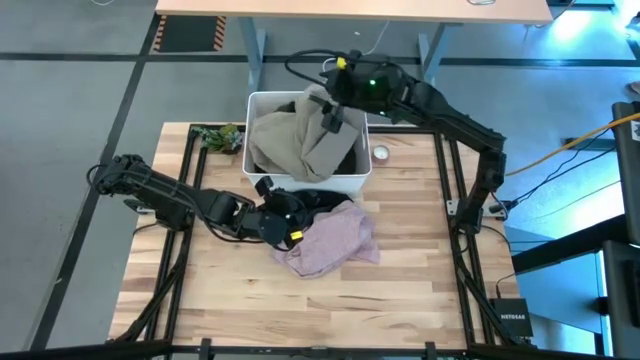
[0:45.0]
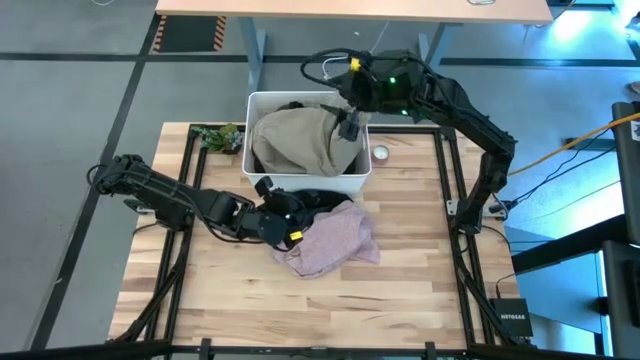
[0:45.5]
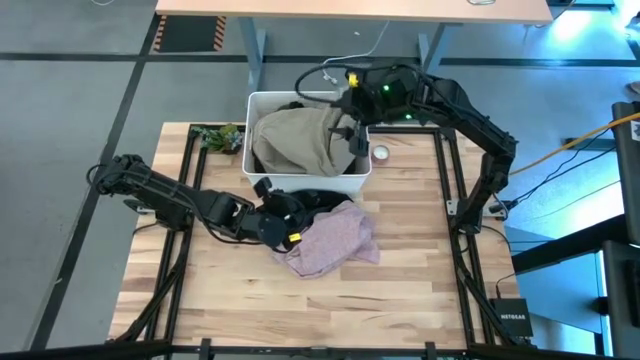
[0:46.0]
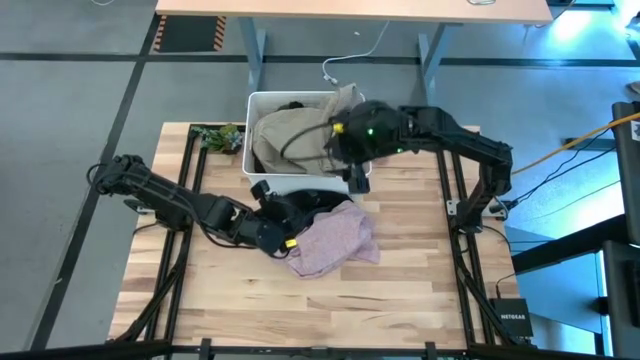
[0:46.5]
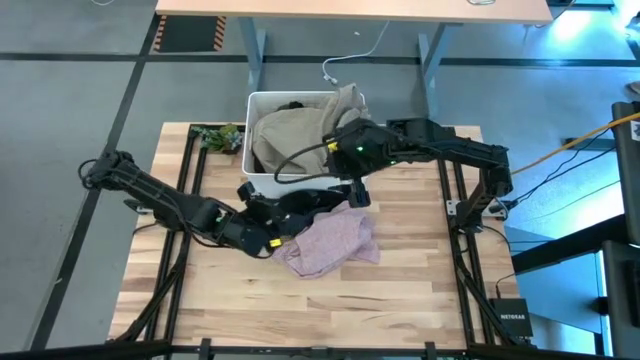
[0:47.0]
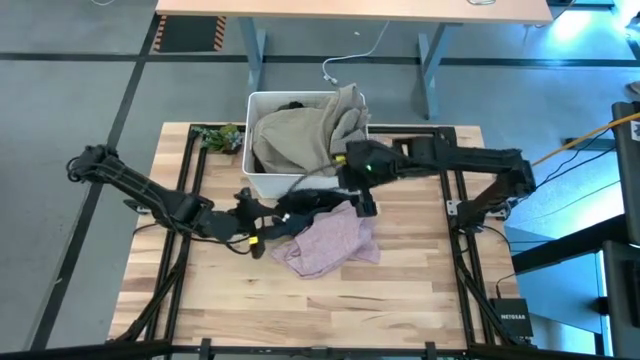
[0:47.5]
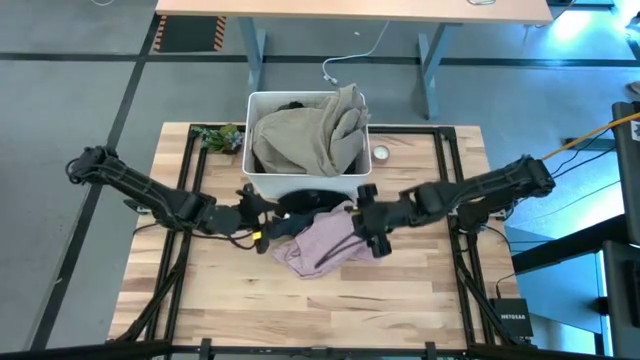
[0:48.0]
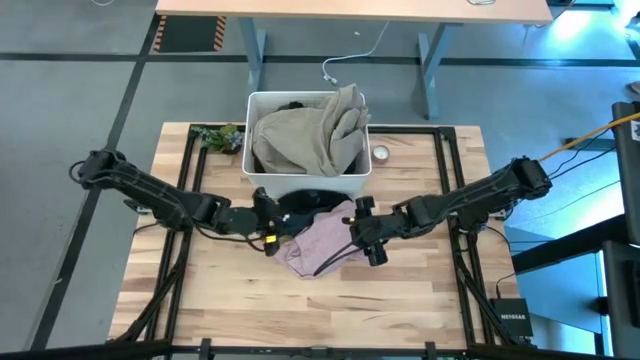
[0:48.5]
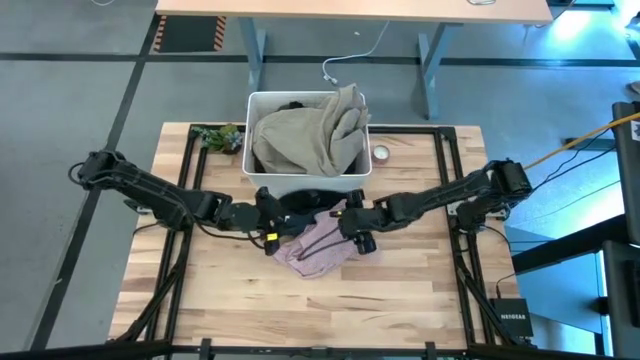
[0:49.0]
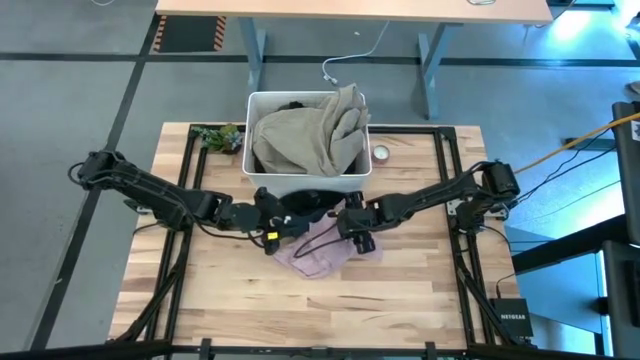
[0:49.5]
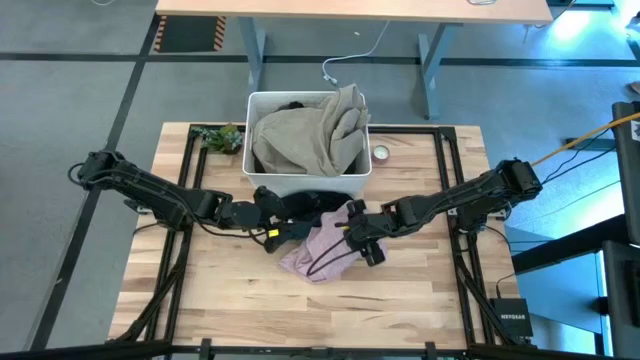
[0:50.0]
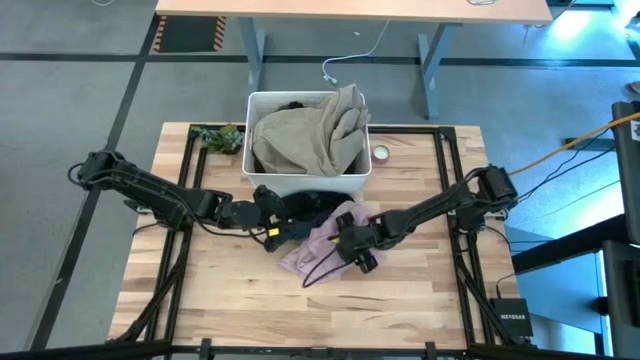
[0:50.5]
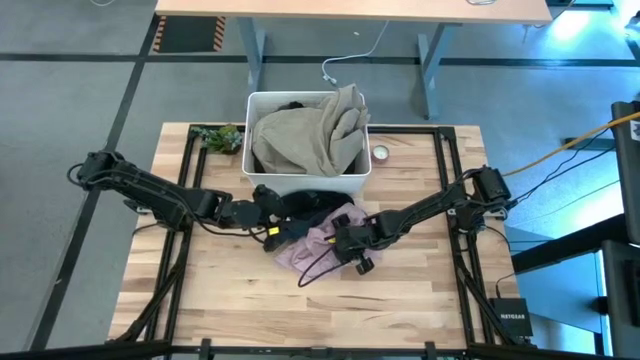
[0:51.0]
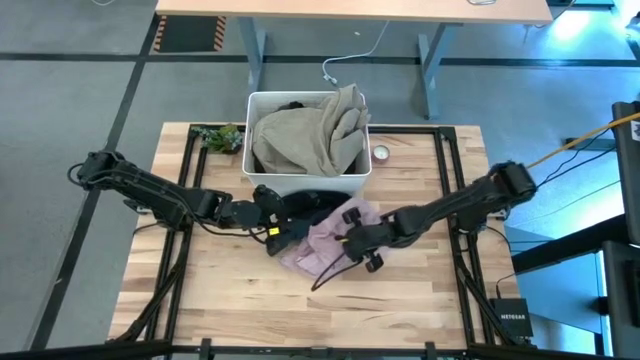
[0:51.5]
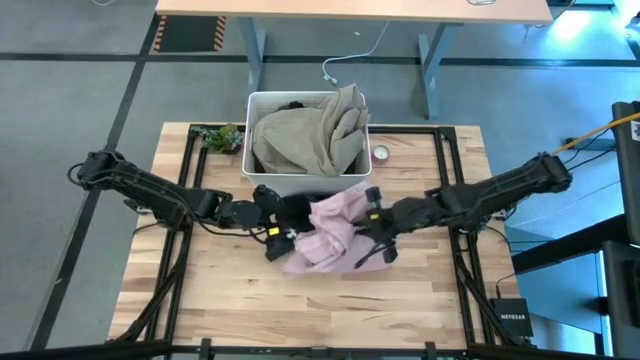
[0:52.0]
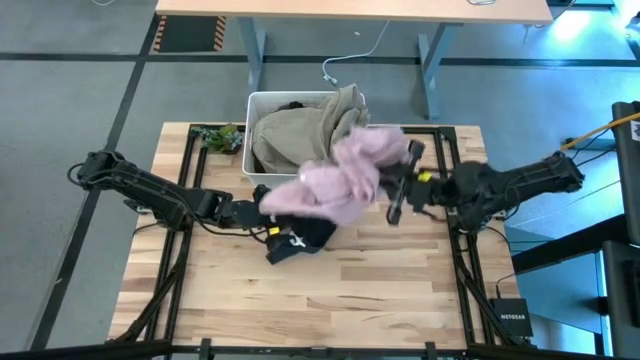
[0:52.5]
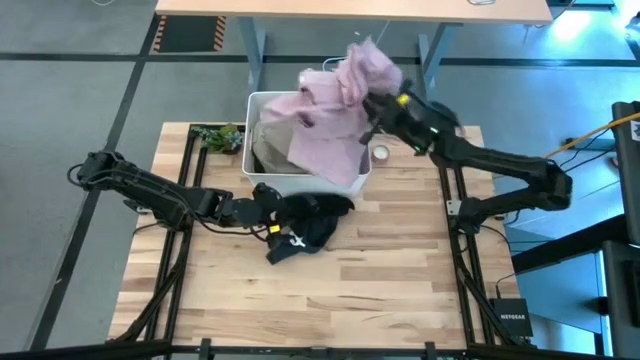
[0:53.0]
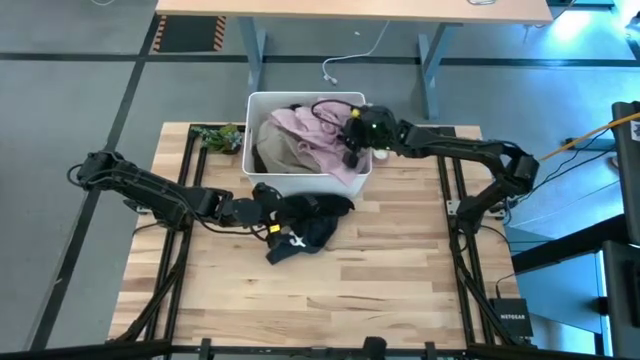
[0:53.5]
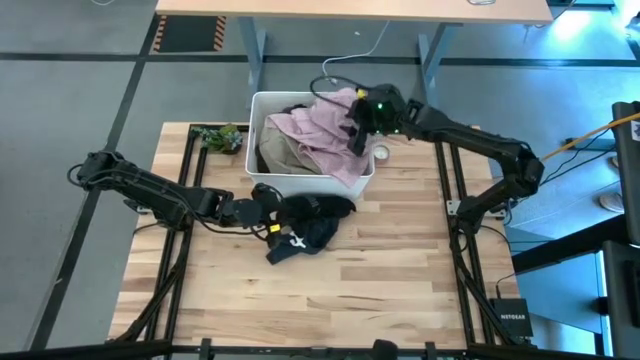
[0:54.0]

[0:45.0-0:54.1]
Task: Sort clothes
Put the pink shirt into the white laundry bin

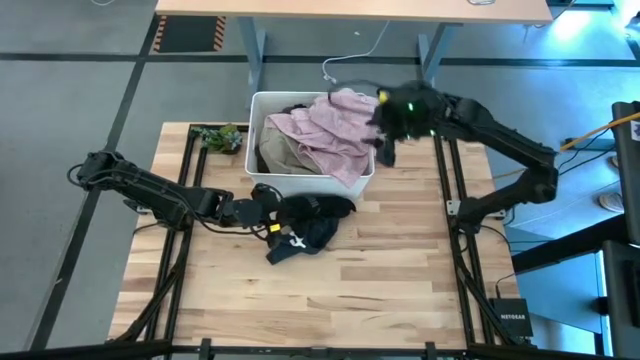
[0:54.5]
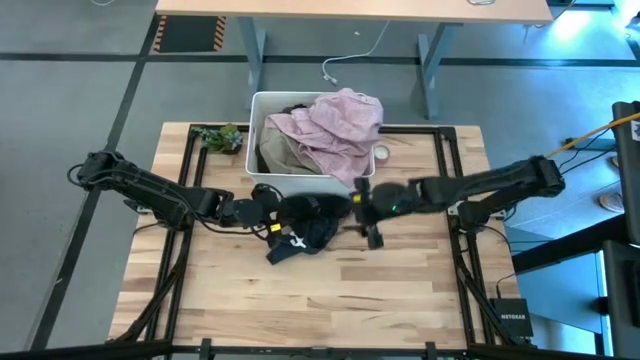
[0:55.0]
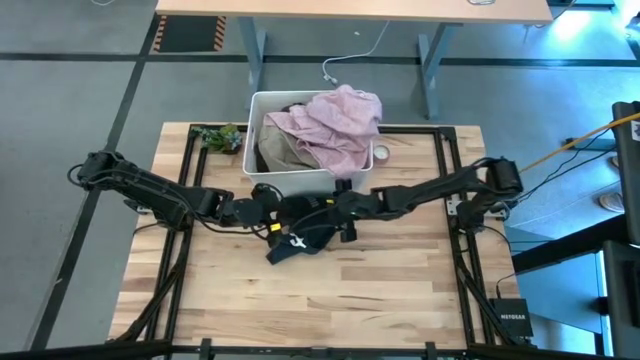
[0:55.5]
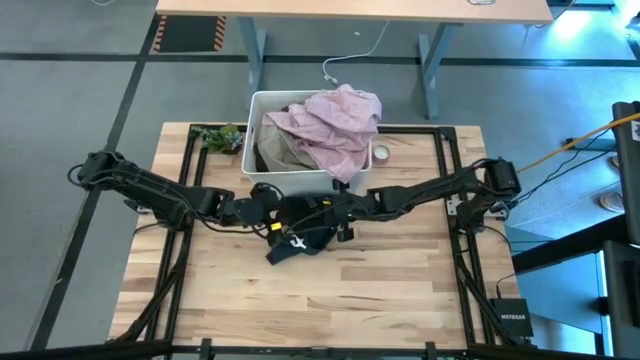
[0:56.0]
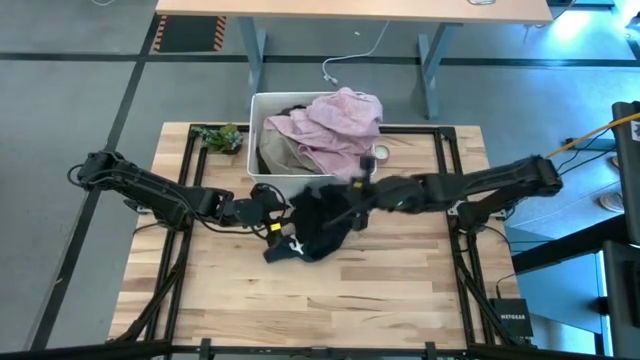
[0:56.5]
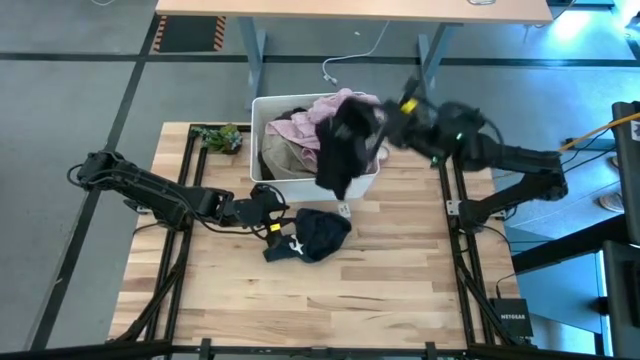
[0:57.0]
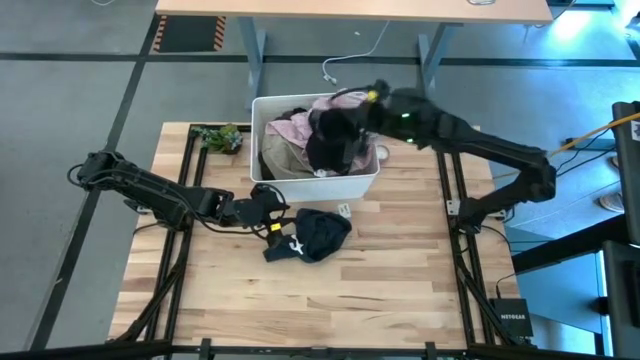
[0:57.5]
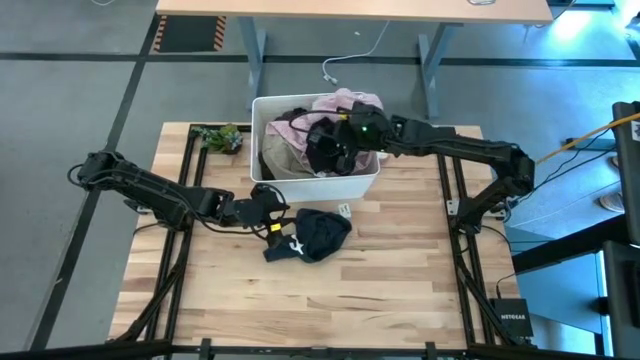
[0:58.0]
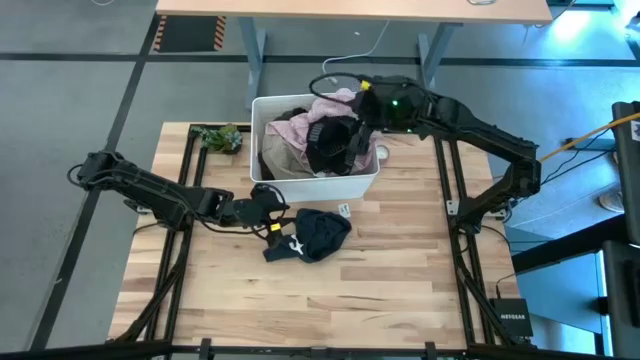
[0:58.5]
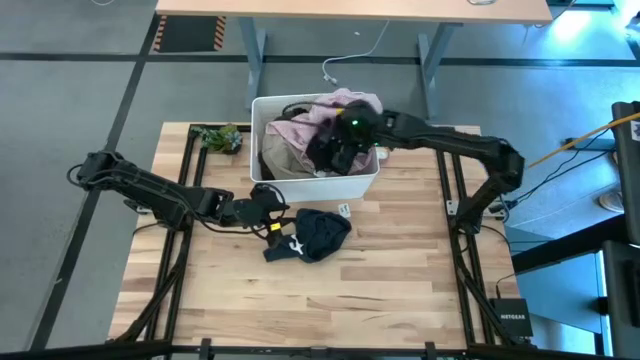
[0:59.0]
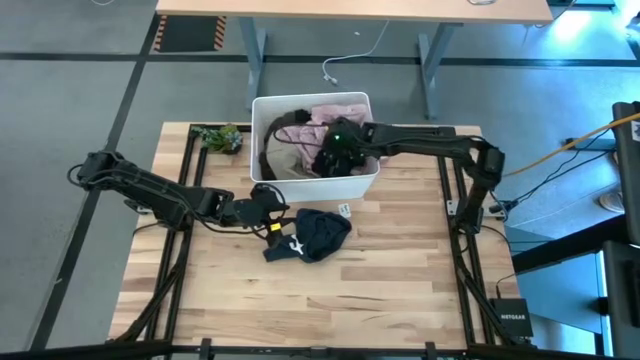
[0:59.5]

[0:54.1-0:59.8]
Put the black boxer into the white laundry bin

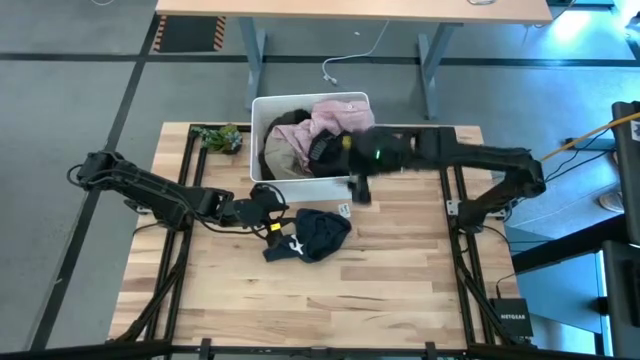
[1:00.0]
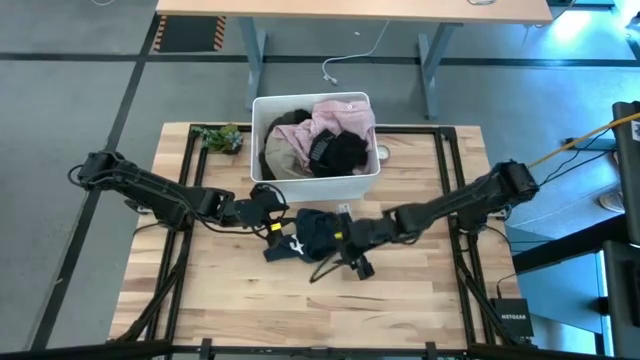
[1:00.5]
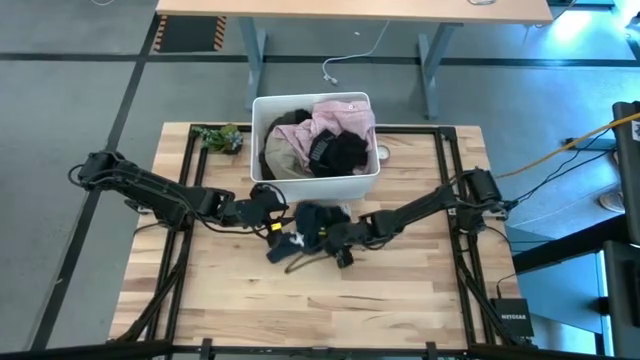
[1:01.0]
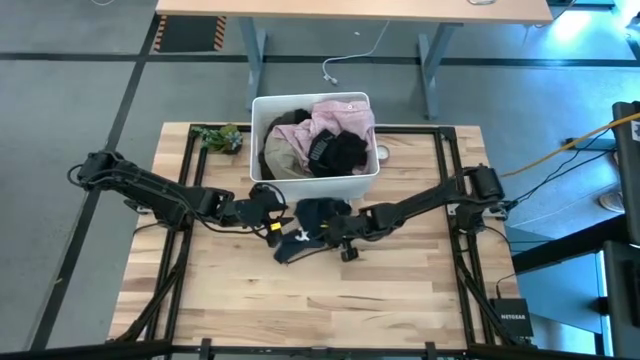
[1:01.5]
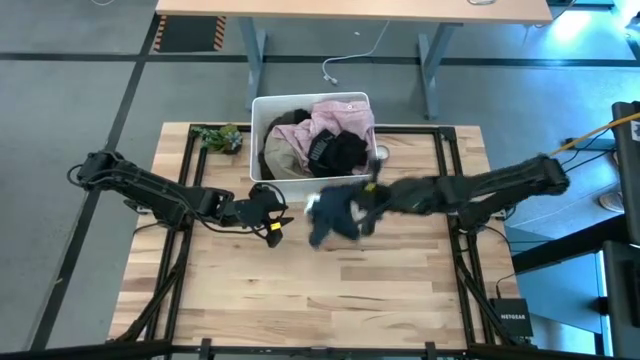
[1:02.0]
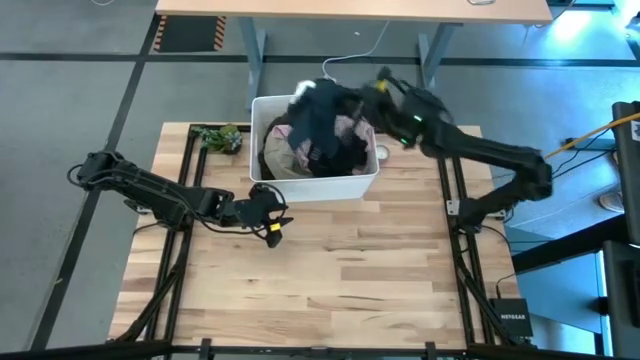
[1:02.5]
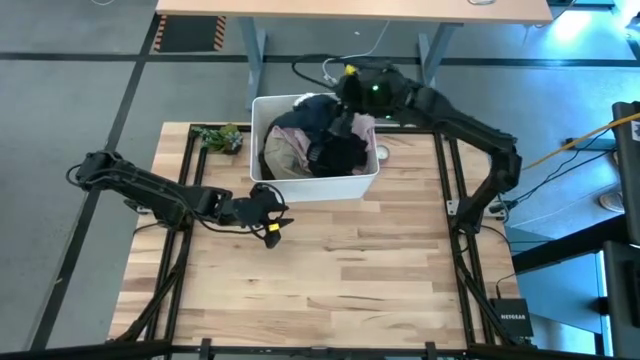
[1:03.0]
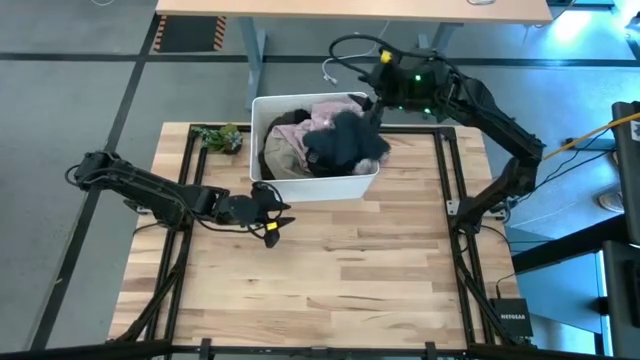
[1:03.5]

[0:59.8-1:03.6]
Put the black shorts into the white laundry bin

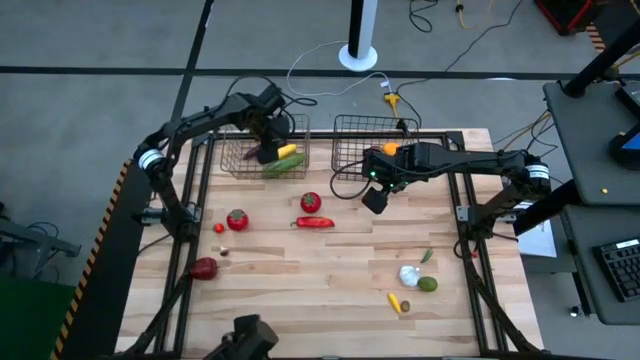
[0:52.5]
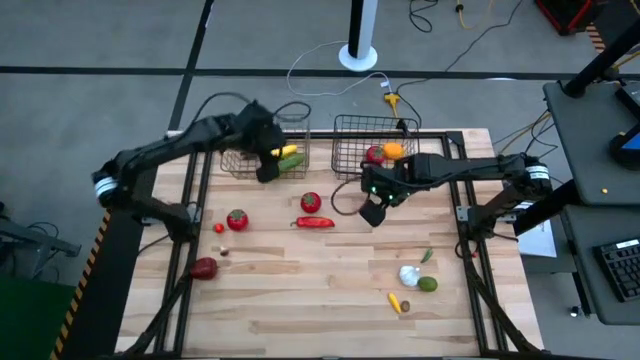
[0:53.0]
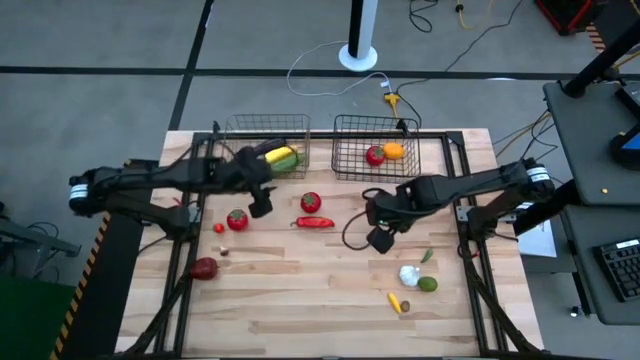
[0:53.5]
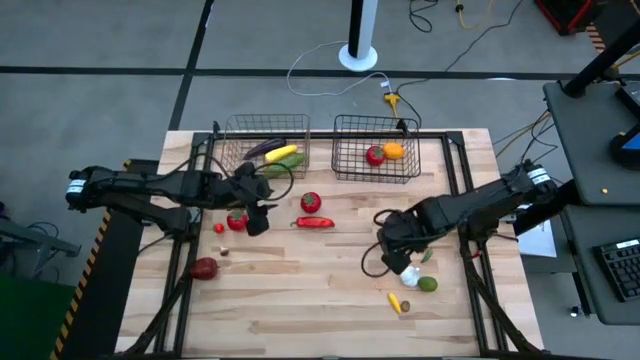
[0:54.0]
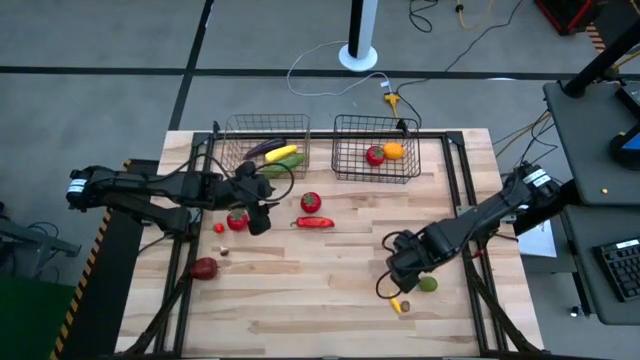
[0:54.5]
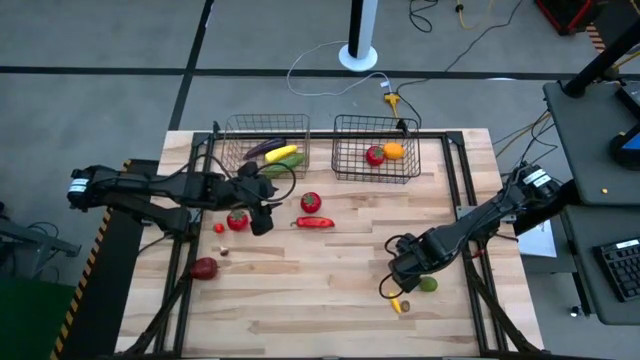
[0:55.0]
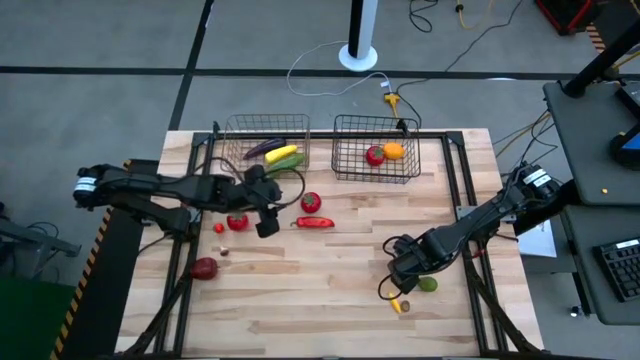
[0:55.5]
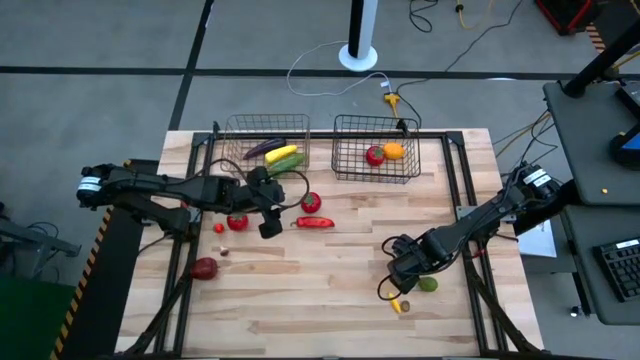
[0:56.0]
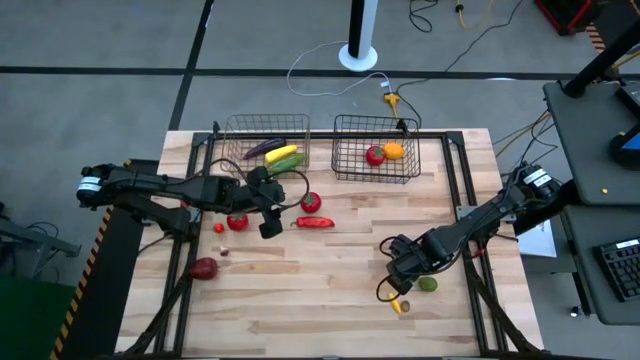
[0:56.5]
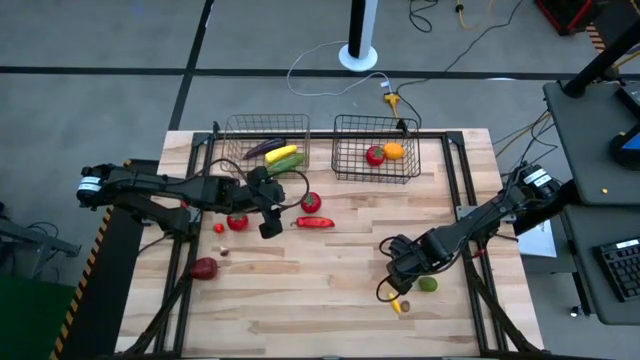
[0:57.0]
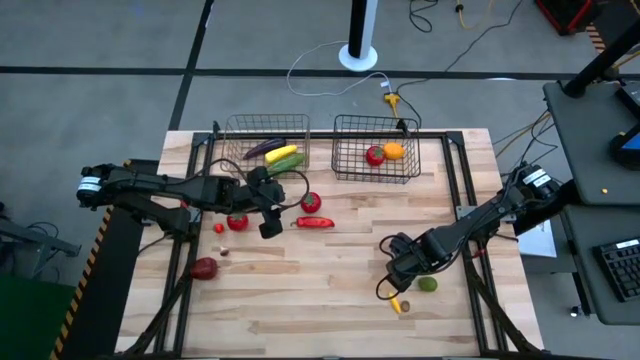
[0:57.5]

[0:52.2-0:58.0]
Task: Sort produce into baskets
Put the white garlic into the left wire basket
